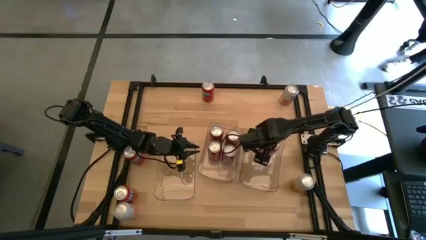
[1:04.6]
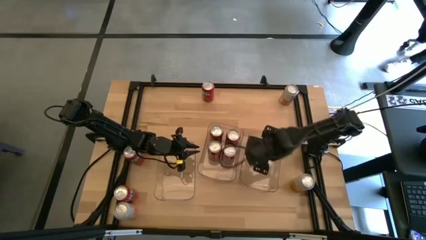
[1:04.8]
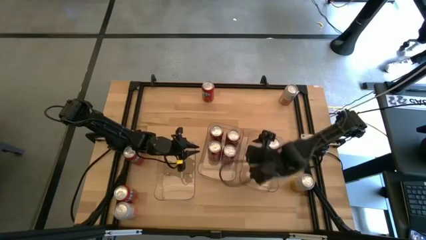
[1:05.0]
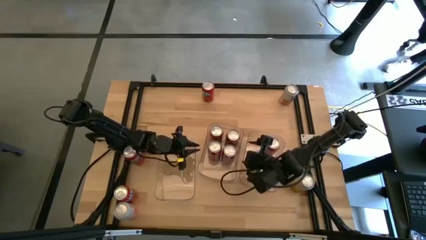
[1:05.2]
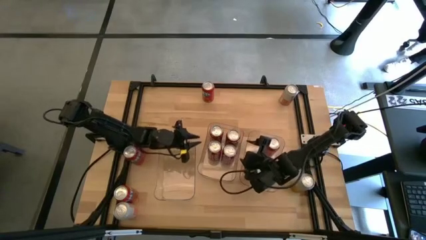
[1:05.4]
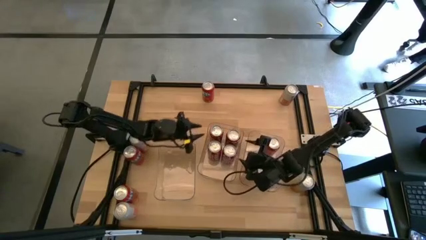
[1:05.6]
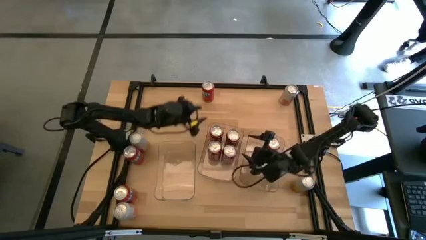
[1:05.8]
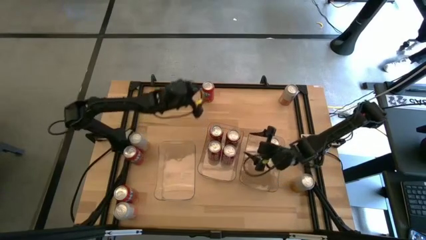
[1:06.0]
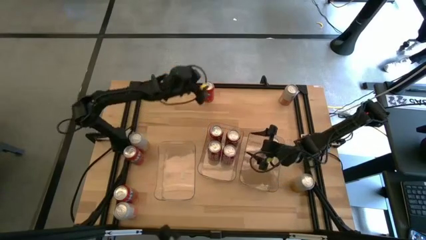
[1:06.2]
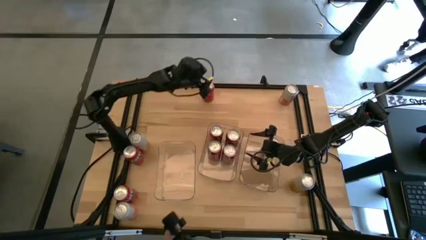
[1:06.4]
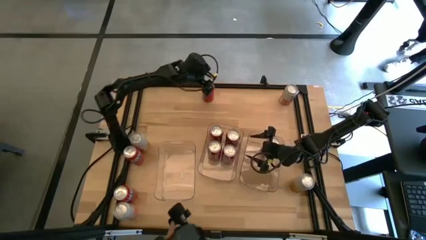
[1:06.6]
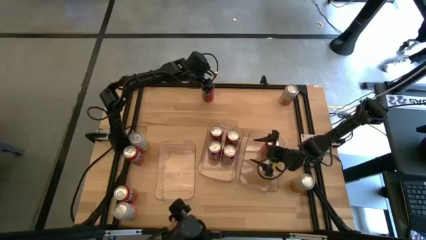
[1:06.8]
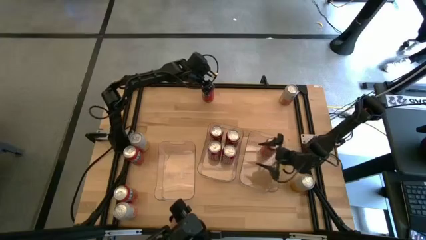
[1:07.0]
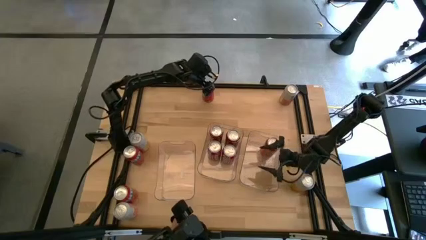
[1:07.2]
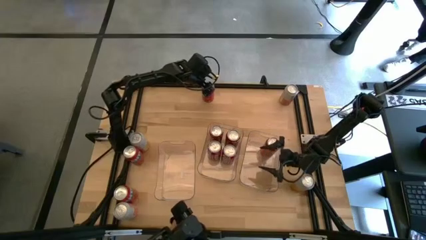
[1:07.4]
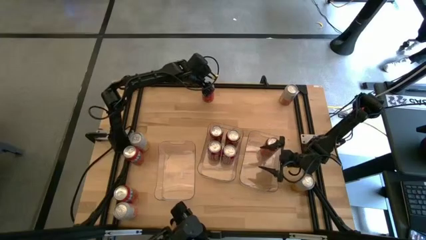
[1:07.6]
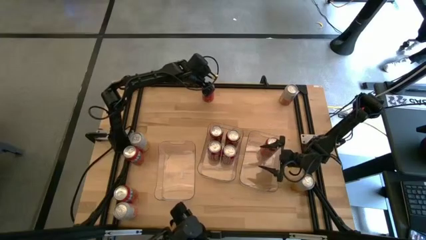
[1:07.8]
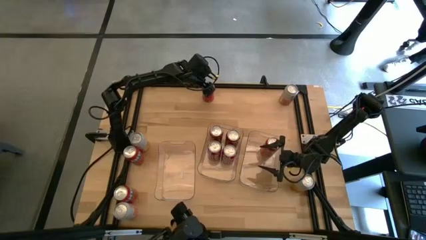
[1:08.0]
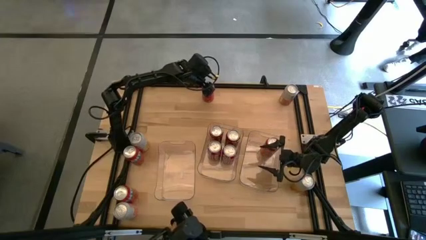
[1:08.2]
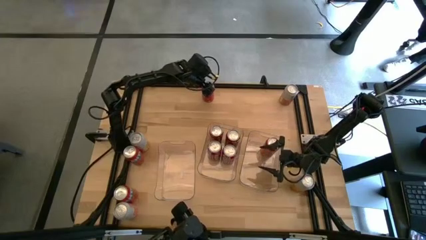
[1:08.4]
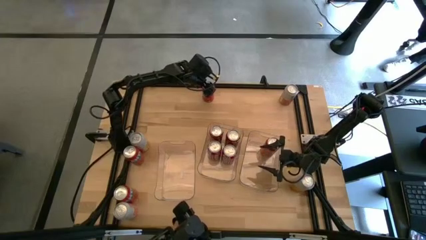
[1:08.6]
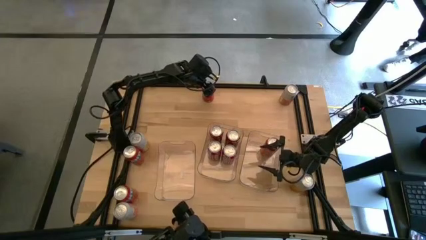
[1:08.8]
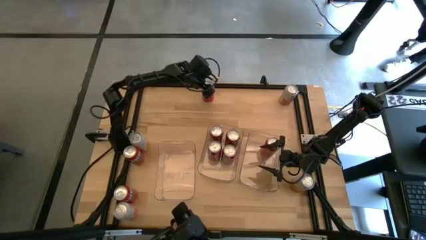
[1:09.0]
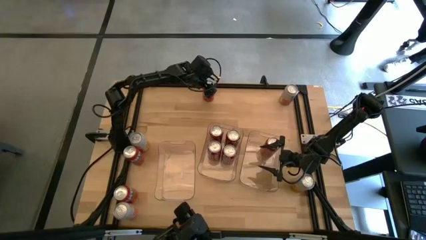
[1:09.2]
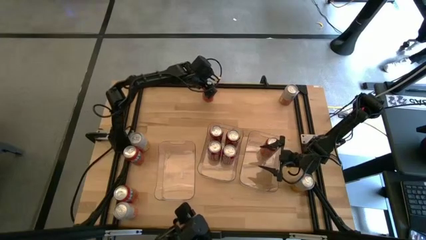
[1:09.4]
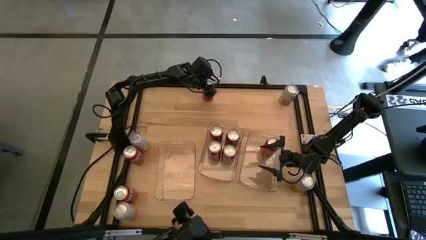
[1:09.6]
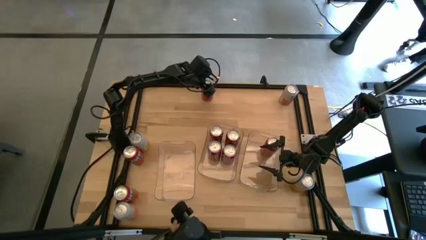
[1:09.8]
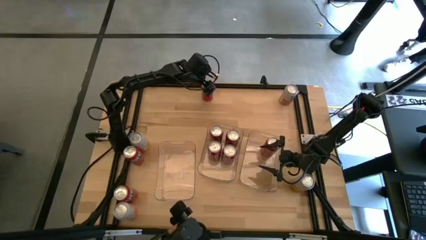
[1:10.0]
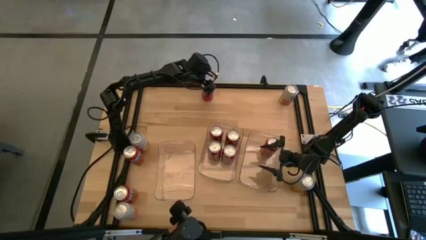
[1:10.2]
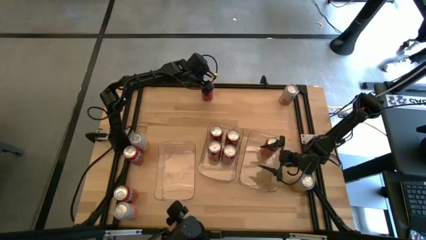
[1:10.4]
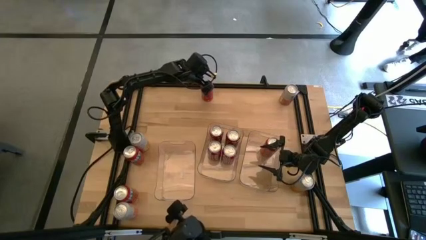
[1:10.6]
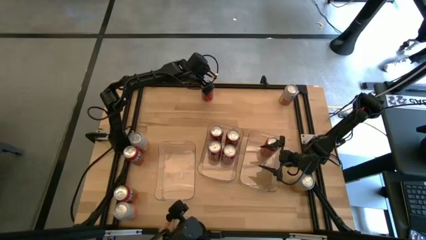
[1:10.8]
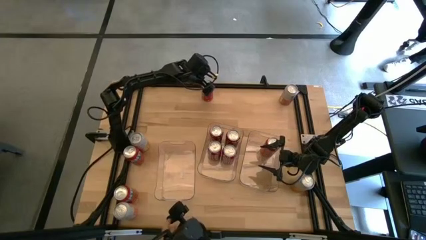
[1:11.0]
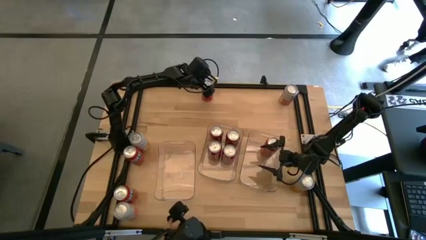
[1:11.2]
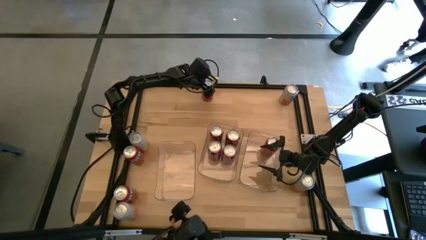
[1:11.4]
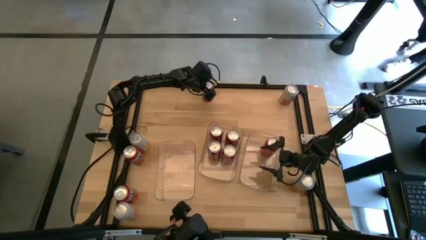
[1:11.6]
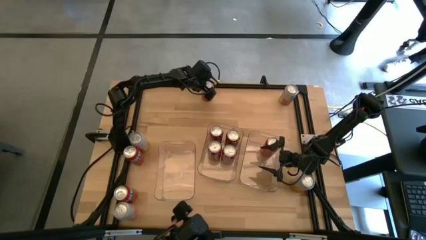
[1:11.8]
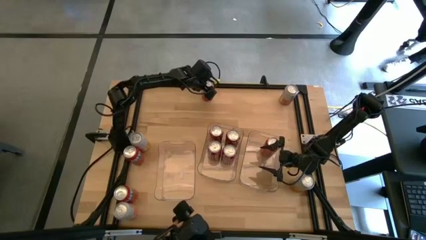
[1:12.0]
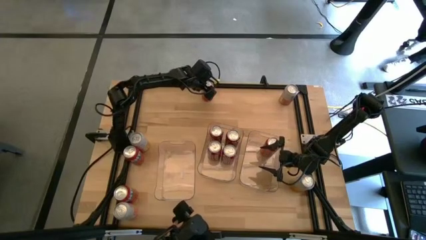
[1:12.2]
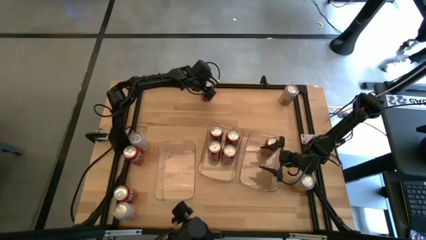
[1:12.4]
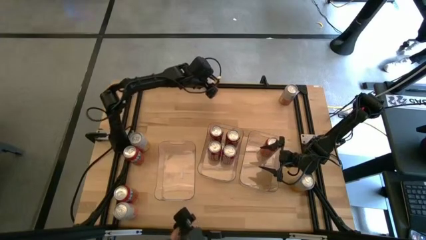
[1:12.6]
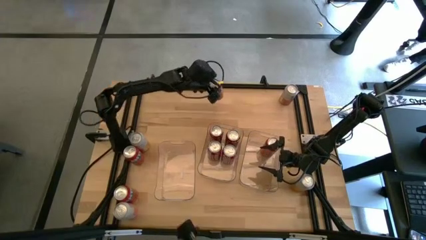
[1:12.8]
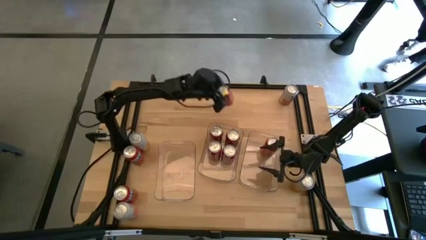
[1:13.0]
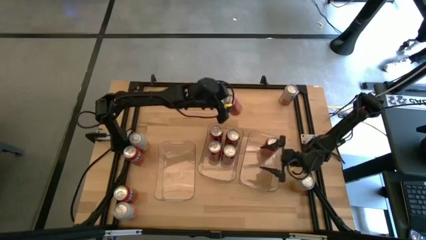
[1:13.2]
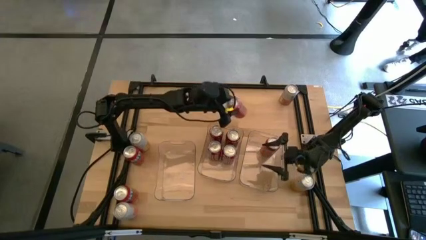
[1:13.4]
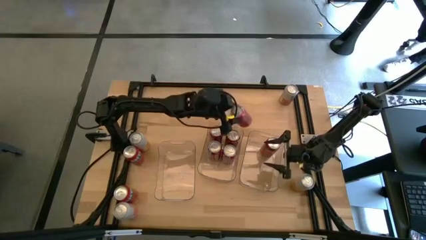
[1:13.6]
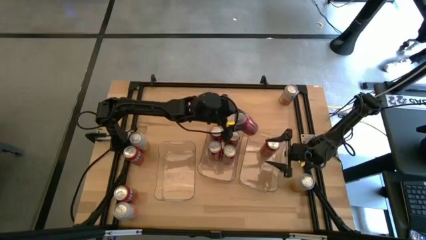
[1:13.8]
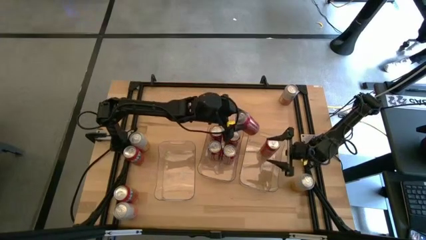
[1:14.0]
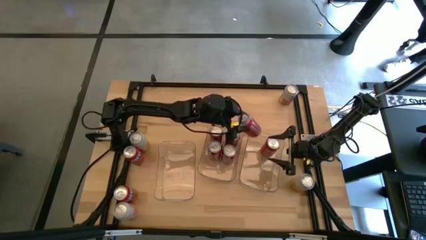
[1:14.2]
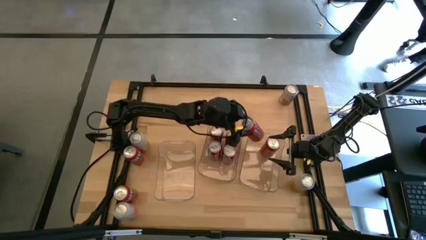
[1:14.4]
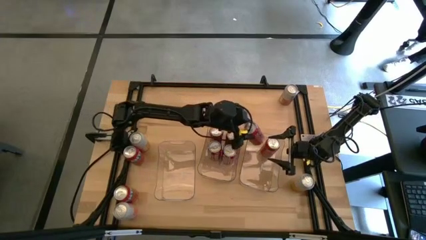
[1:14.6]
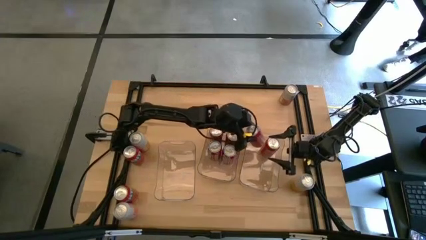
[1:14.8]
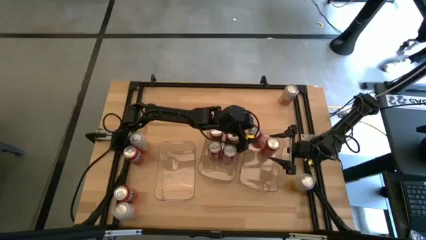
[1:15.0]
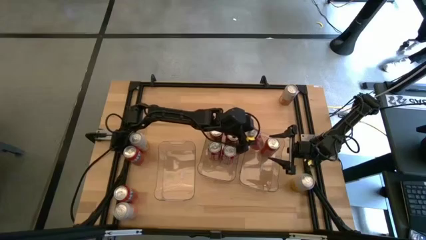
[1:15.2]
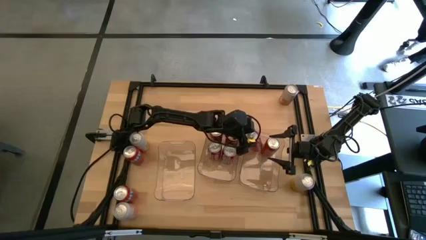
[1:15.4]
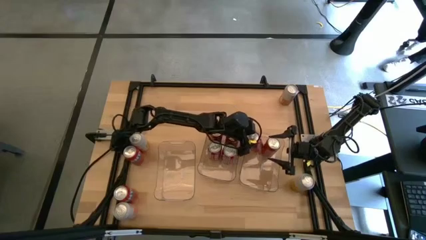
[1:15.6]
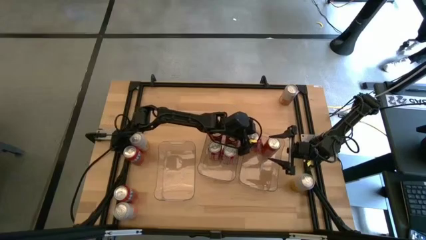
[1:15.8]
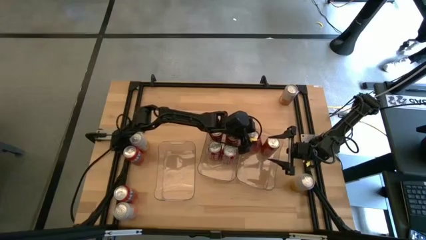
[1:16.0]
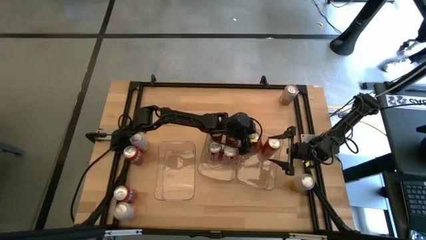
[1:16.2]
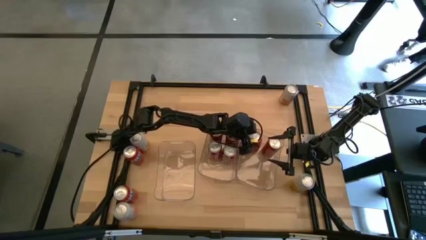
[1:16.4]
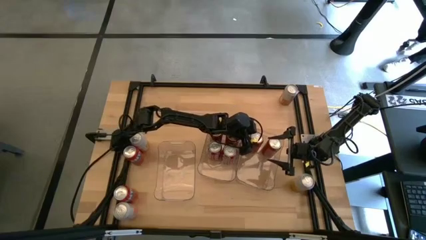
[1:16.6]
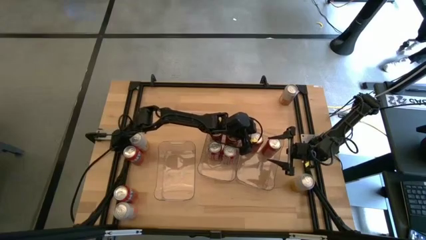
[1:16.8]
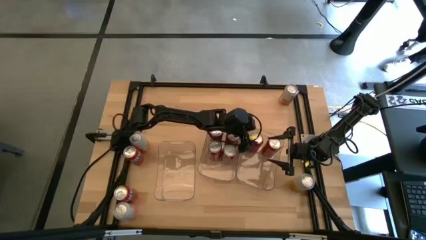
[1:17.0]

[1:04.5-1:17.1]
Task: Sort soda cans
Put the top left red soda can into the right transparent bin

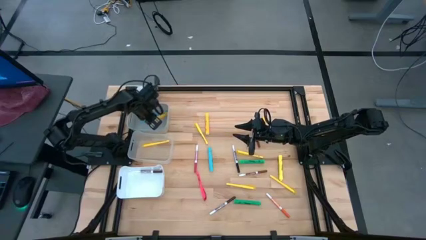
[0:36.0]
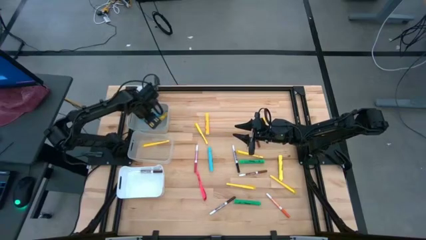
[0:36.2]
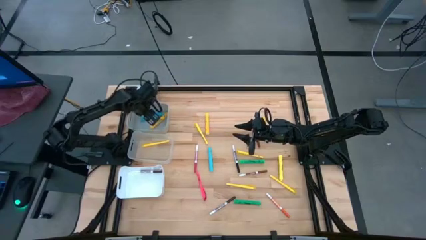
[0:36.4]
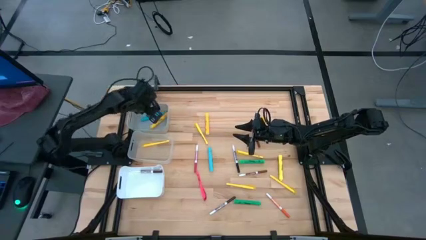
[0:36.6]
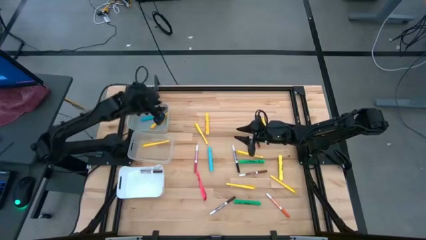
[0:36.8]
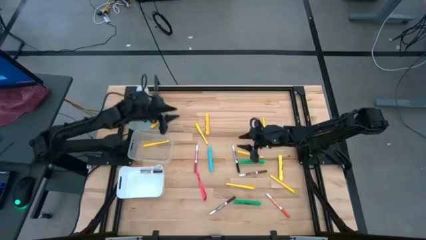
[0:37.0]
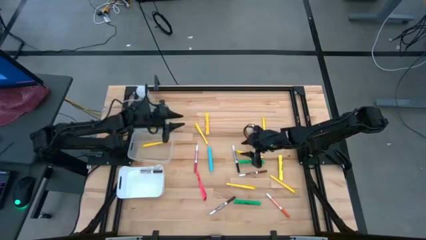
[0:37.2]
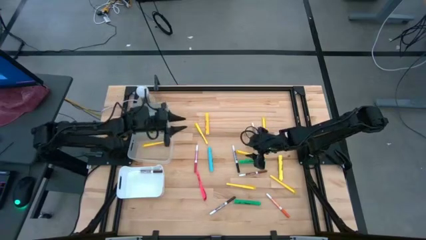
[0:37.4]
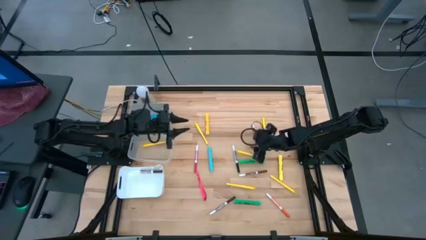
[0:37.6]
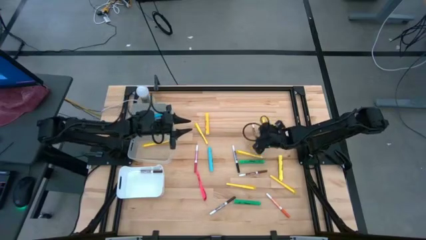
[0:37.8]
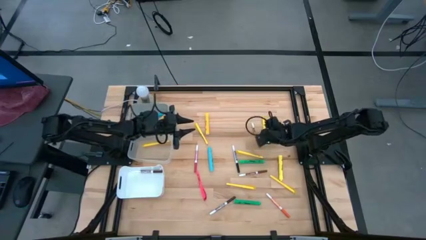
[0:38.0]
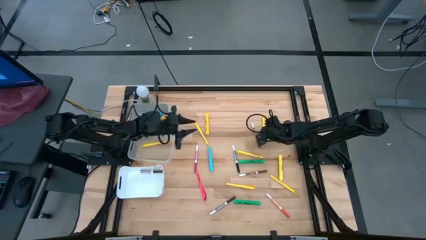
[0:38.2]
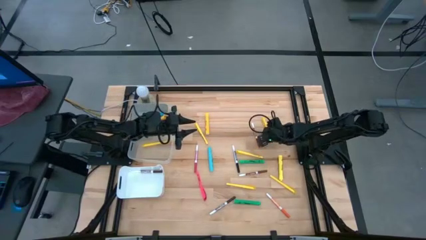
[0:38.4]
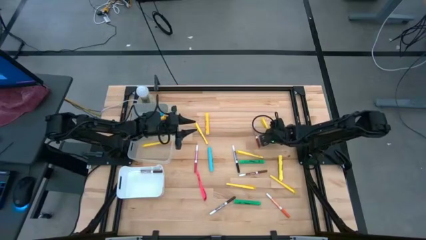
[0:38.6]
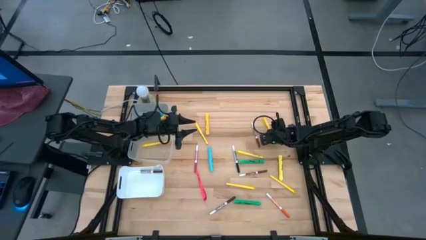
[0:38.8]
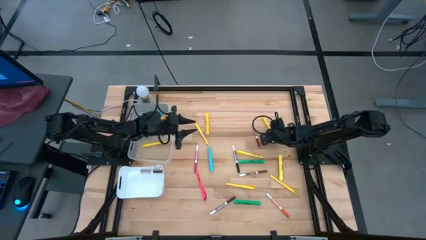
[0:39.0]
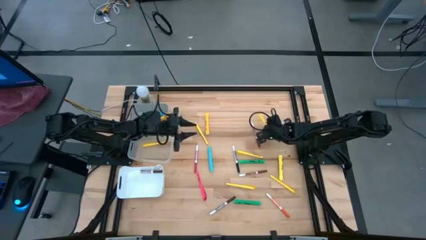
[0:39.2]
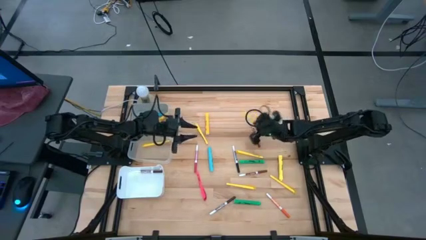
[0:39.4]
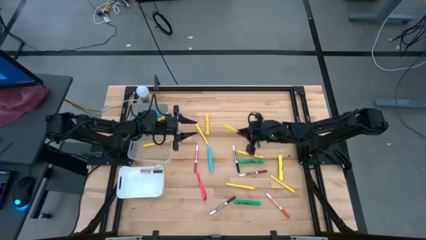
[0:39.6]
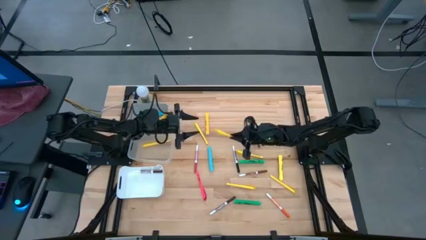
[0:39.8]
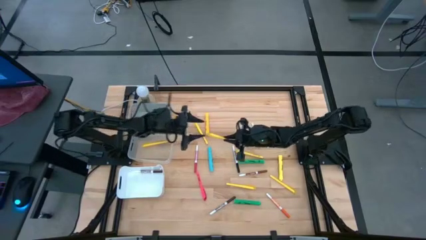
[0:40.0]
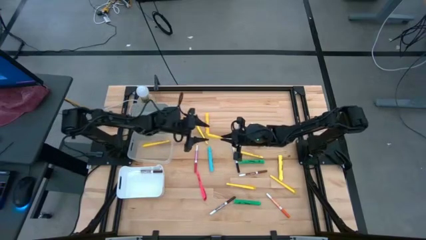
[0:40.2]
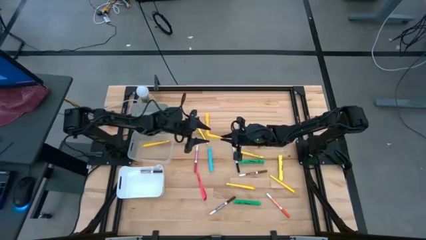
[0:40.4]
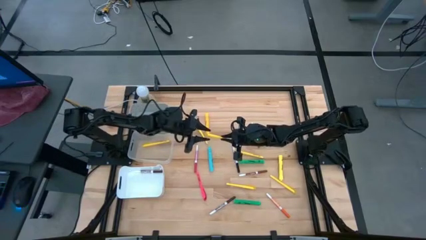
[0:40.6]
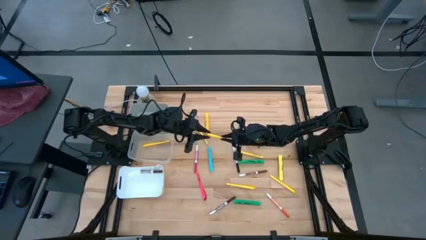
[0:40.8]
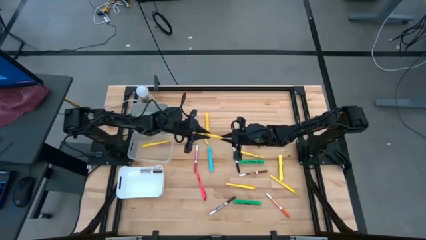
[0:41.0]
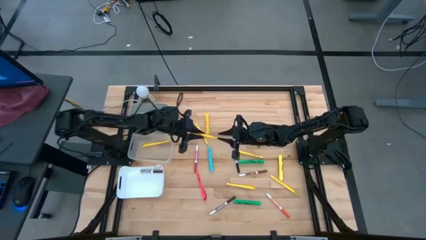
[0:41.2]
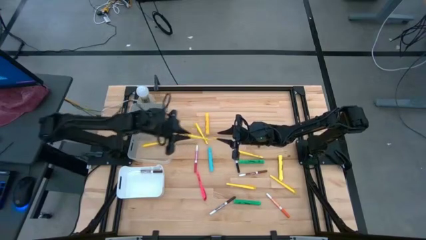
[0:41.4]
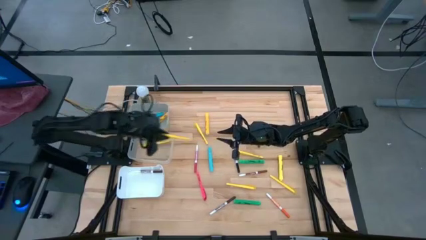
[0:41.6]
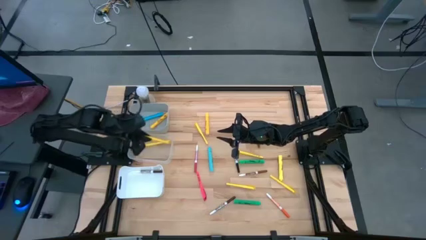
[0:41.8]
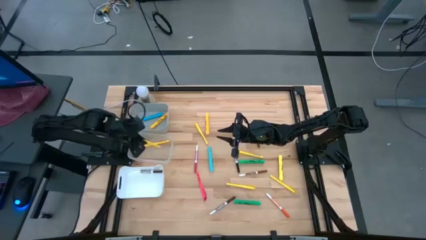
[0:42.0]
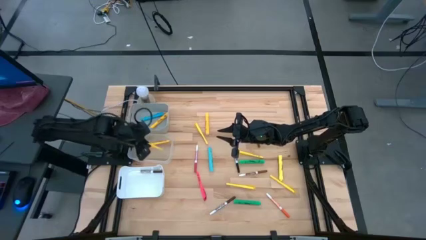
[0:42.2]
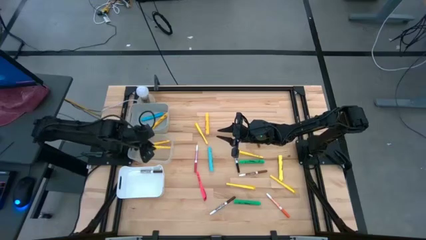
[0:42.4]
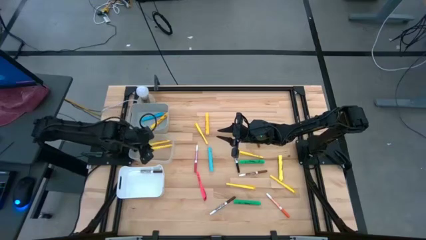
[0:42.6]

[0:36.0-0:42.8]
Task: Pick & Place Markers
Put the yellow pen into the transparent bin
